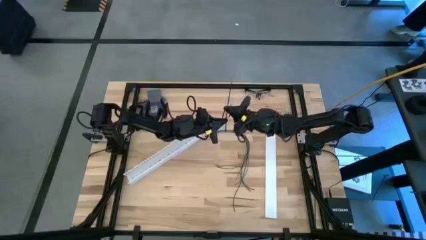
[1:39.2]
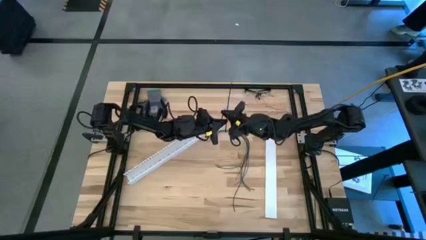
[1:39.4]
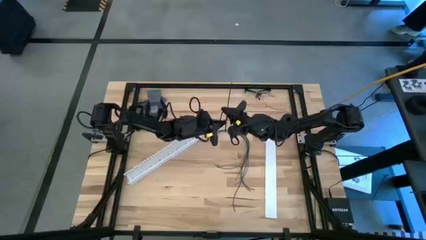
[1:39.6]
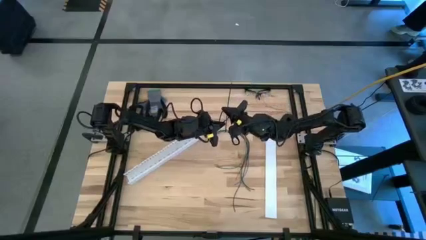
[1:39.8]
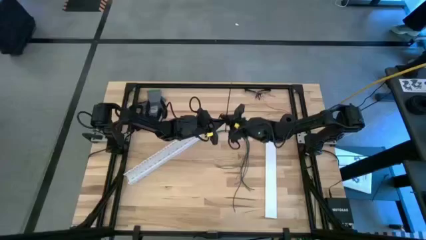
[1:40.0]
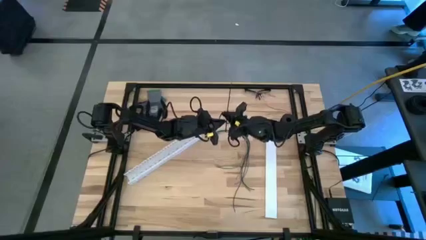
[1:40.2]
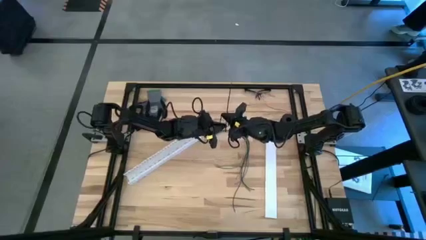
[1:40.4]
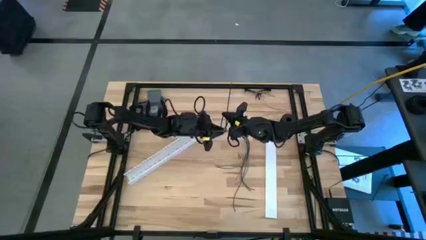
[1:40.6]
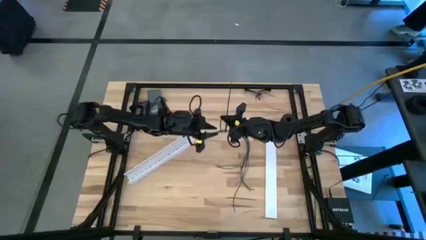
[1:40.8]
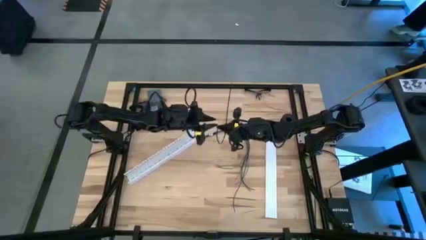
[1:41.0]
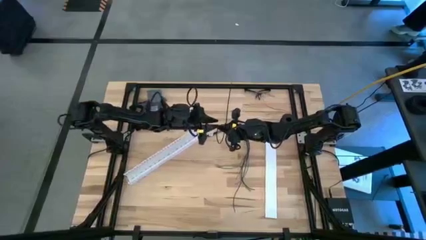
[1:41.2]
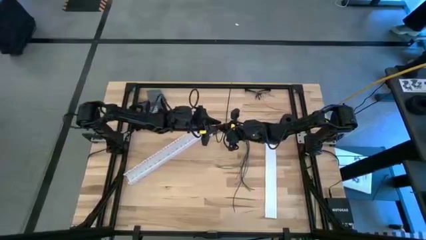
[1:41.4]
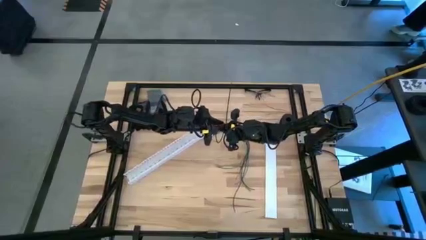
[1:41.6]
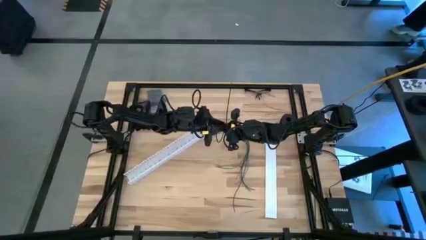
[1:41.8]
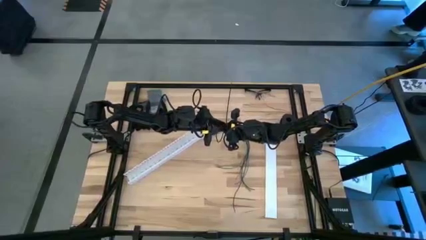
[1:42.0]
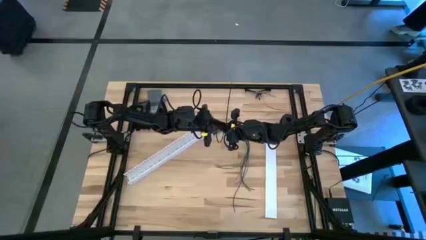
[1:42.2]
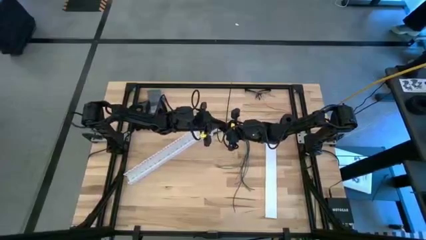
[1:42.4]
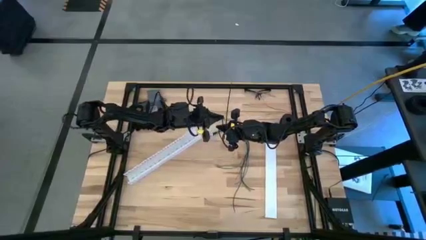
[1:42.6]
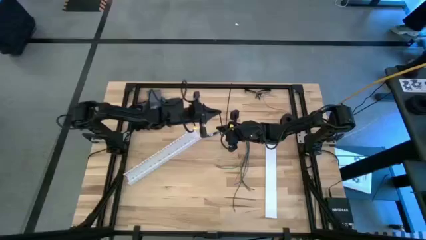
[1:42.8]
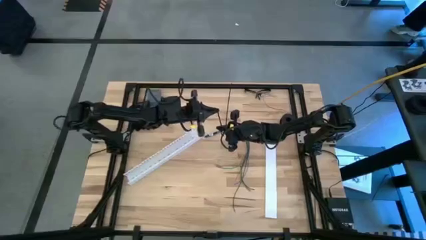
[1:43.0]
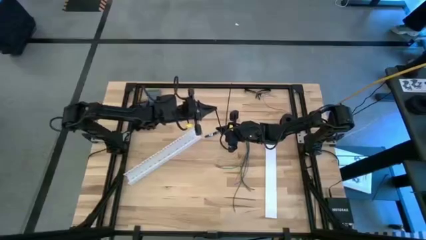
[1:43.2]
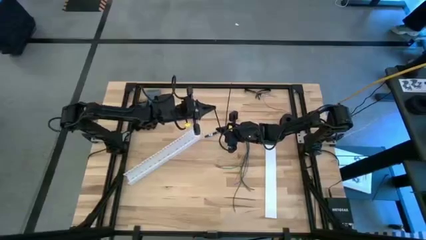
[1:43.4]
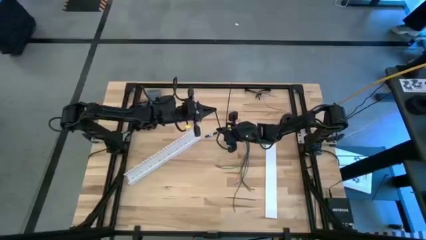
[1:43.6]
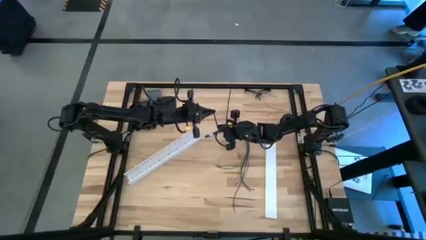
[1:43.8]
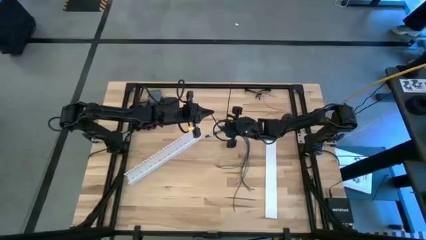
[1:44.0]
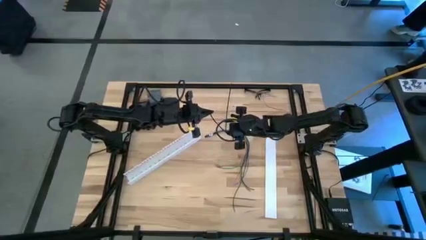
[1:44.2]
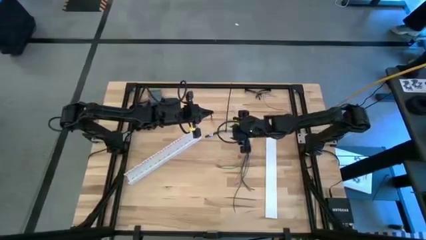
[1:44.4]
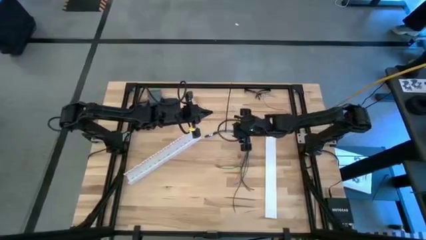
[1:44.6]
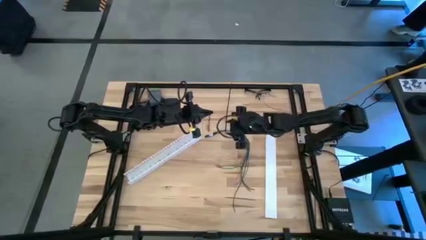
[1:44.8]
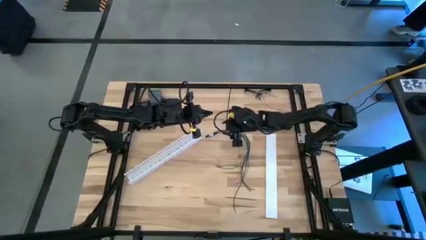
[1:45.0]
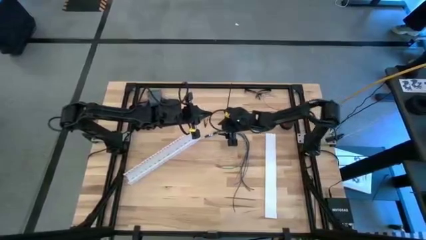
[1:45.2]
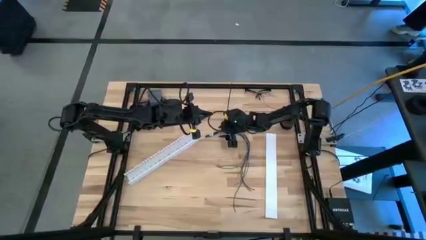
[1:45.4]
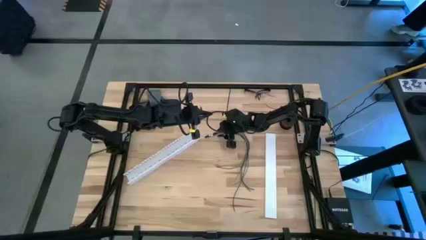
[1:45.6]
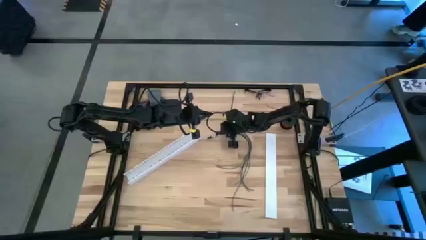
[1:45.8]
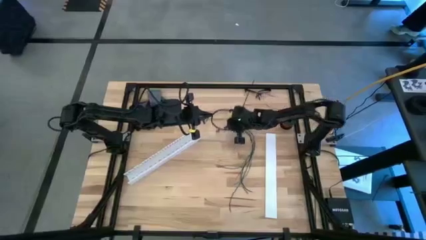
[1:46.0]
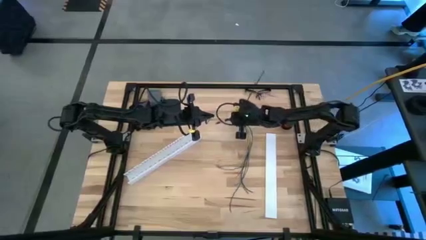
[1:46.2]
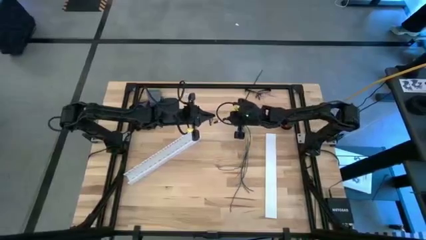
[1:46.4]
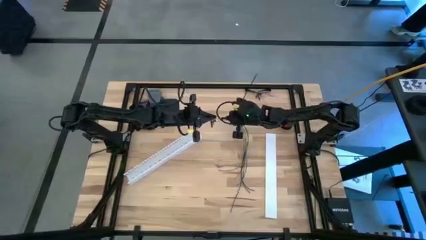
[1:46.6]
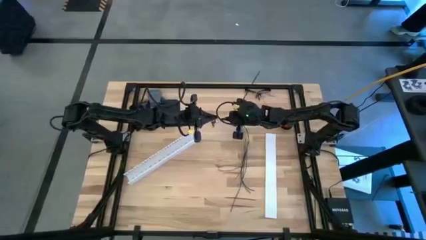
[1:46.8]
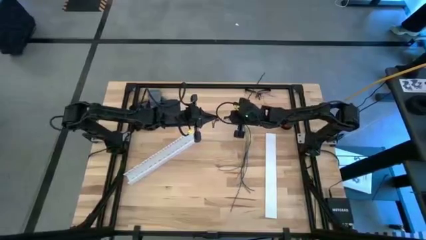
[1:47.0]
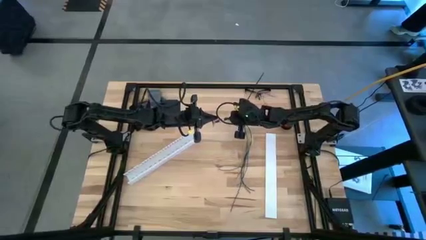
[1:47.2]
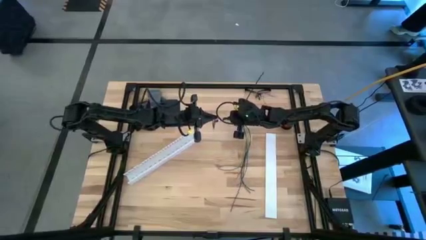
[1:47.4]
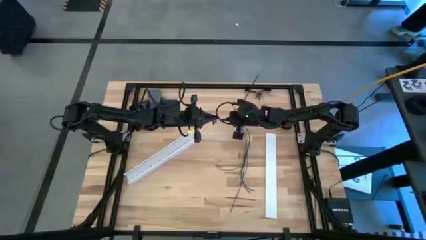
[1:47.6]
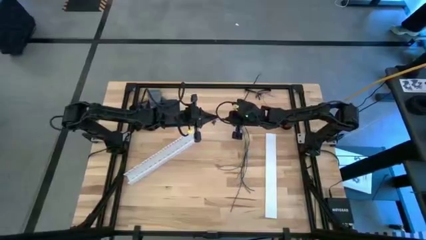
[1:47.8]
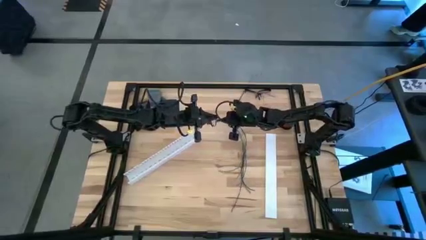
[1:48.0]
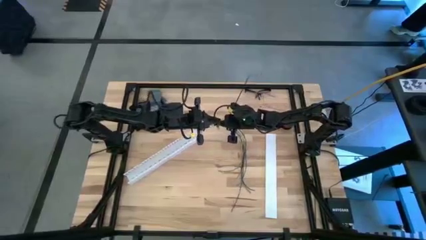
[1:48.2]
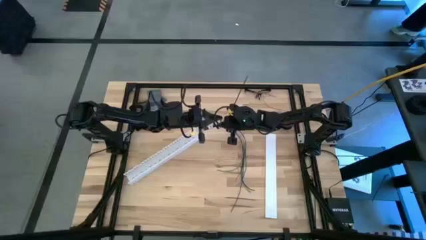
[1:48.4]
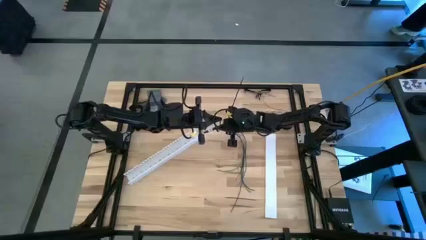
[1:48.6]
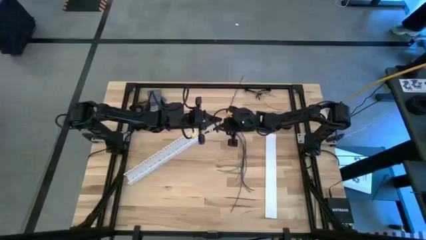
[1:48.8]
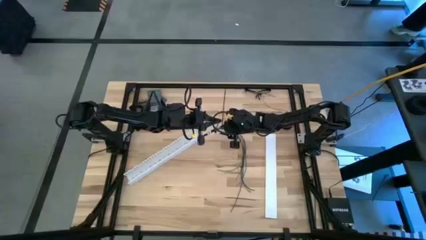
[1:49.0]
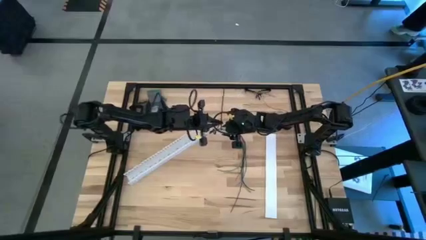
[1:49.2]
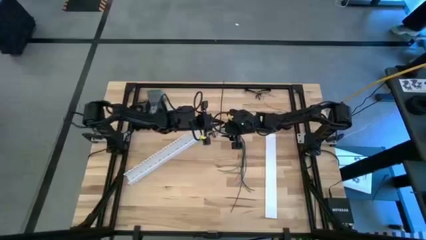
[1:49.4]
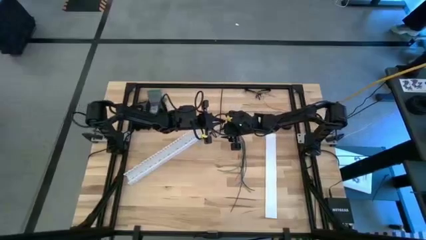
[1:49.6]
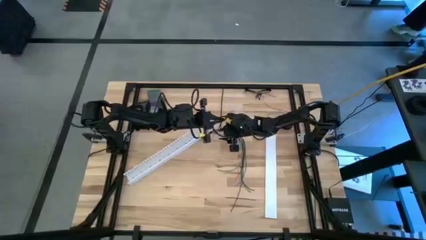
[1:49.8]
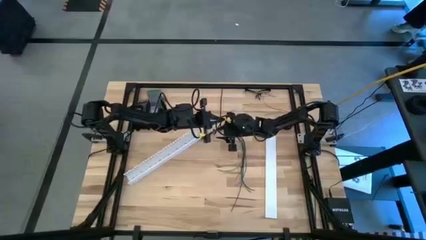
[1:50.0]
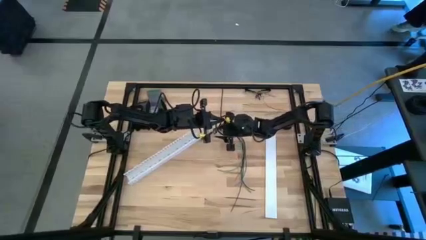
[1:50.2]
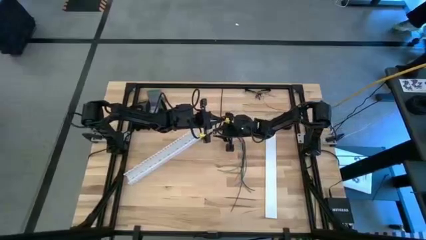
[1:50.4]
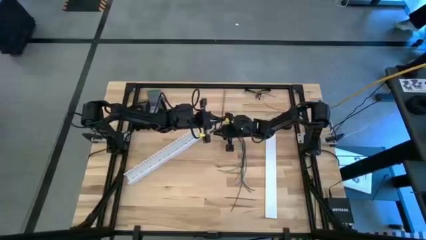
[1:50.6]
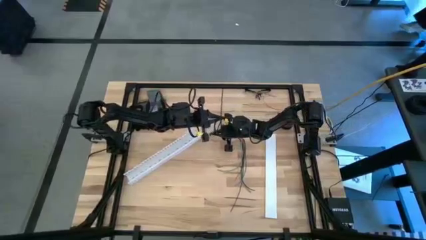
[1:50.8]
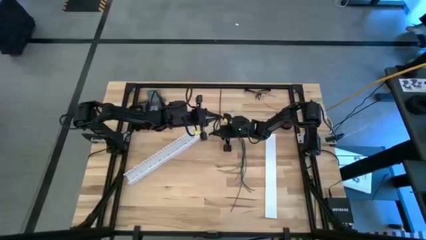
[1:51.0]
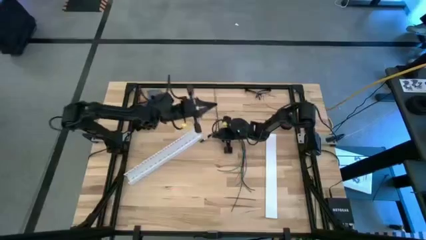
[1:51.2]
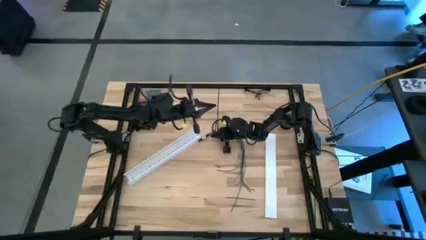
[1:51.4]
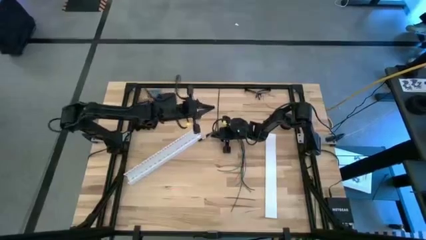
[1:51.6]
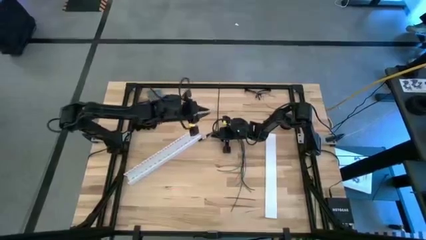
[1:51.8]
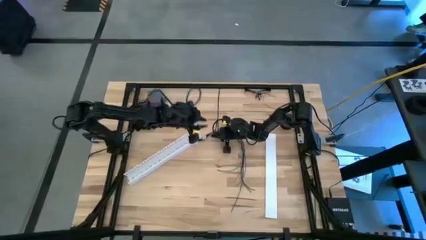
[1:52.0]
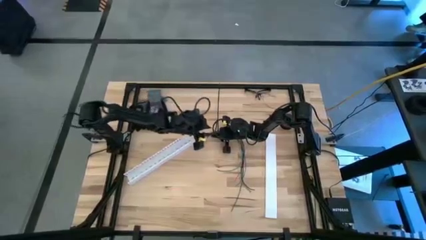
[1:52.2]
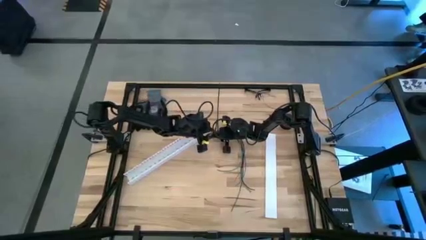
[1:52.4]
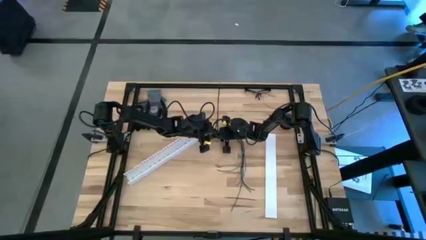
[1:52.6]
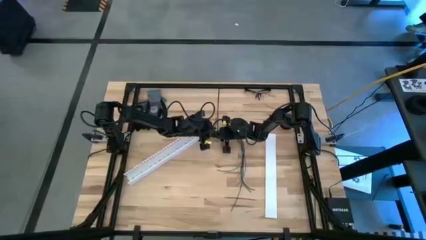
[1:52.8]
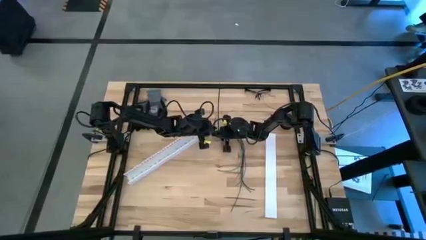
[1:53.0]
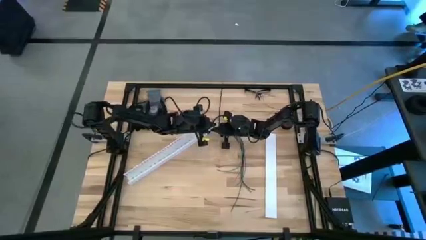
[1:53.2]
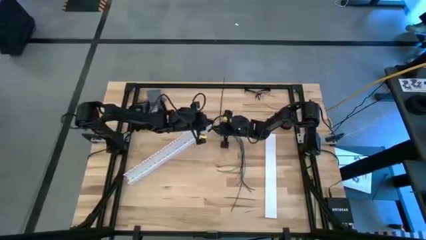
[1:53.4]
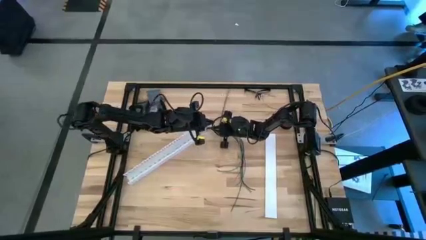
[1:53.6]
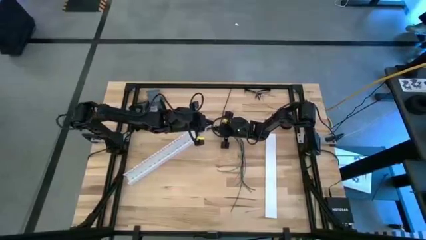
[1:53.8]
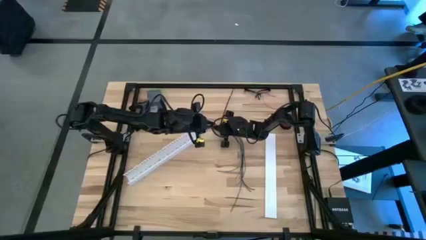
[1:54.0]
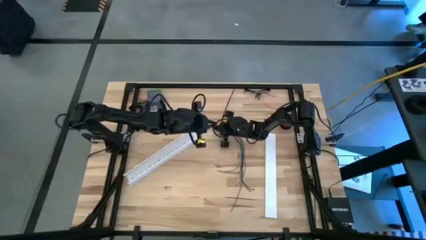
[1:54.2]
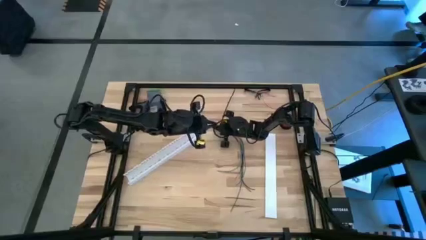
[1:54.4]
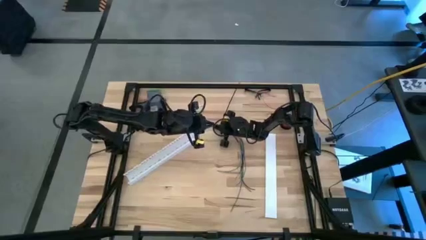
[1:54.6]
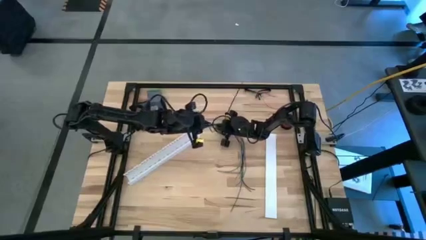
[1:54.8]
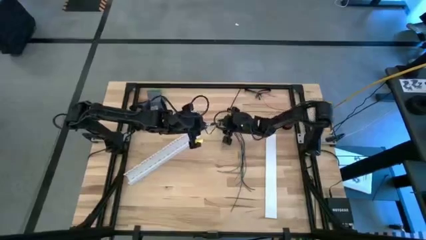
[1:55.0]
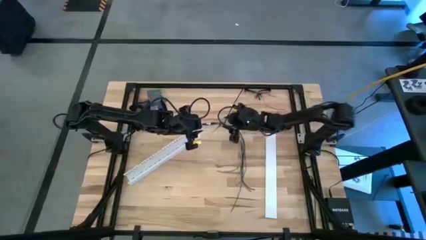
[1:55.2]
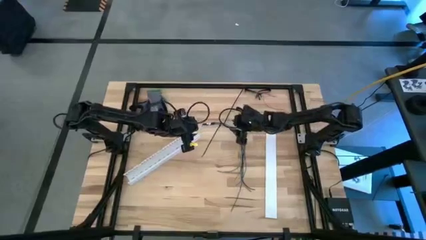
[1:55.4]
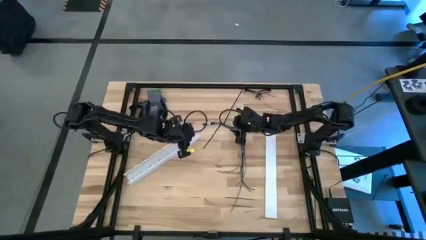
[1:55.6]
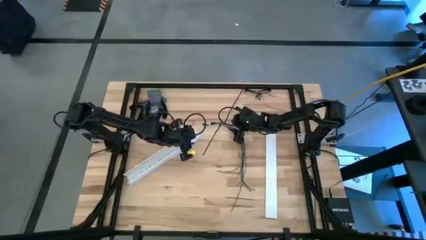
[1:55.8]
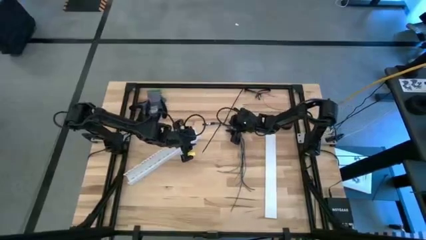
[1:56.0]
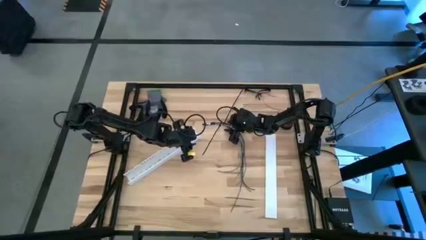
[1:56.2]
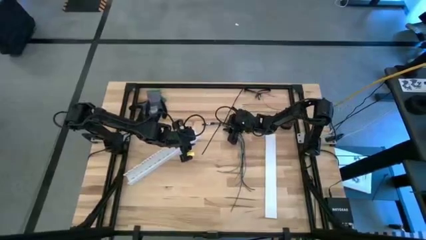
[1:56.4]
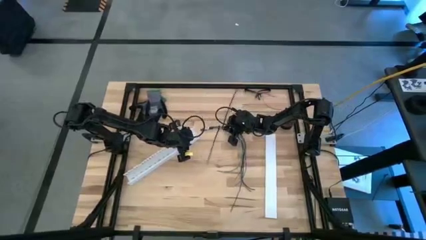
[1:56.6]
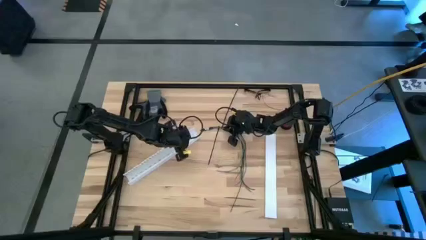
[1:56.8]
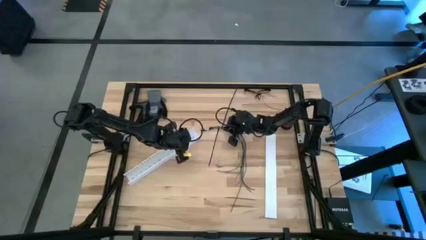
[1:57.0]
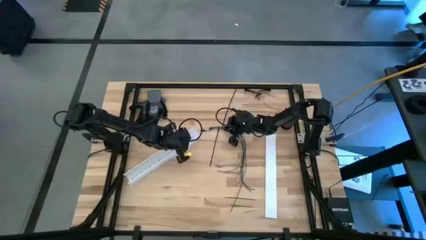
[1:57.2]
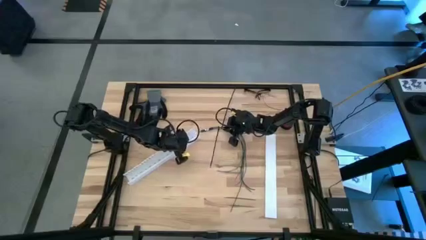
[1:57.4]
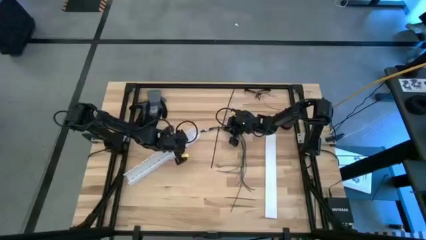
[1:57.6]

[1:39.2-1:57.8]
Task: Ziptie cables
Wrap the black zip tie on the colored cables
